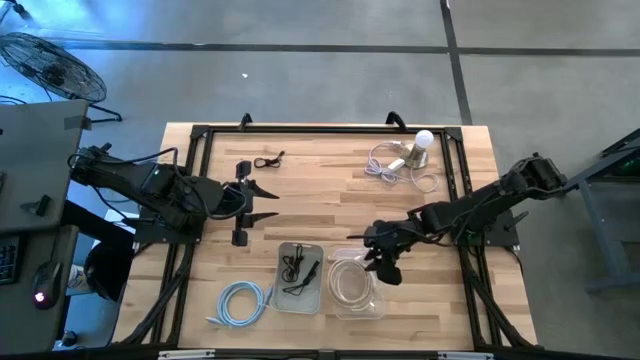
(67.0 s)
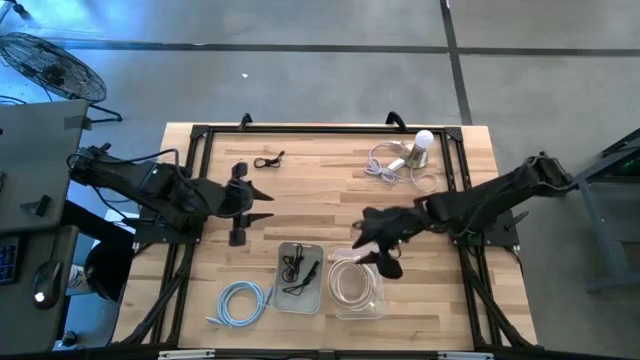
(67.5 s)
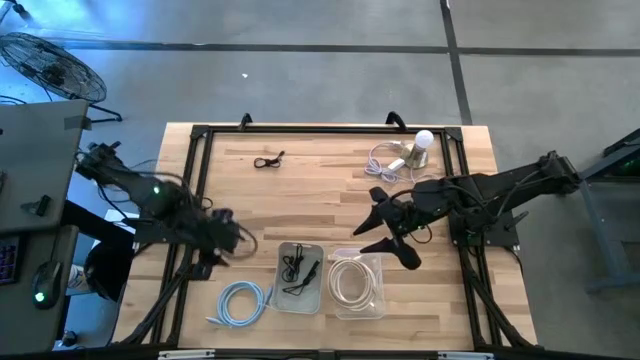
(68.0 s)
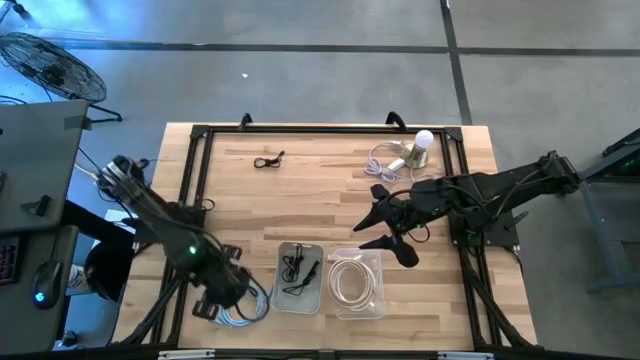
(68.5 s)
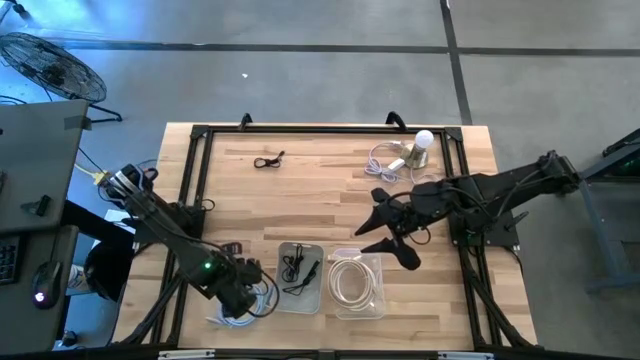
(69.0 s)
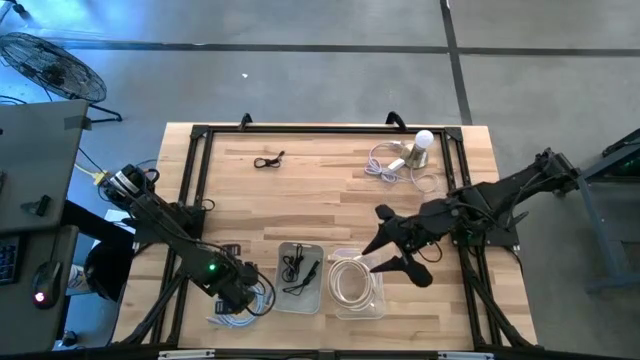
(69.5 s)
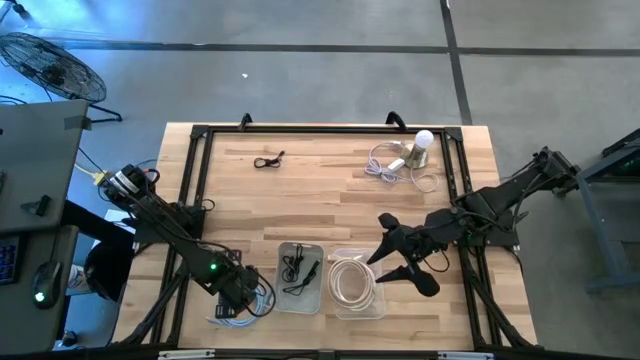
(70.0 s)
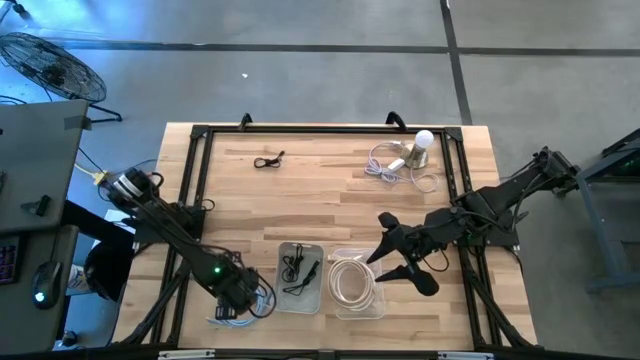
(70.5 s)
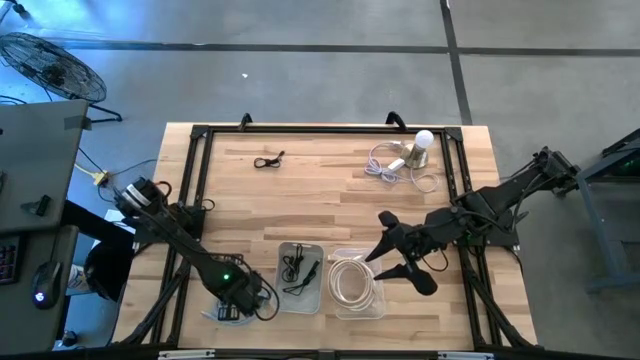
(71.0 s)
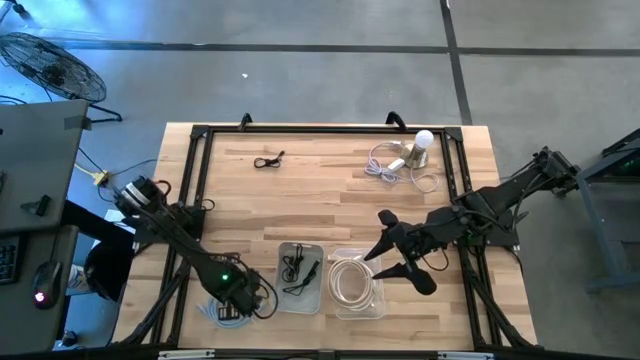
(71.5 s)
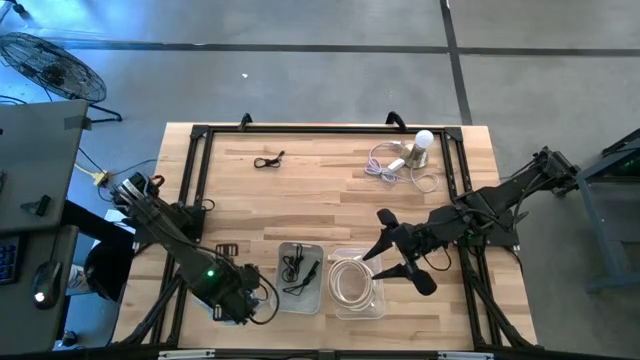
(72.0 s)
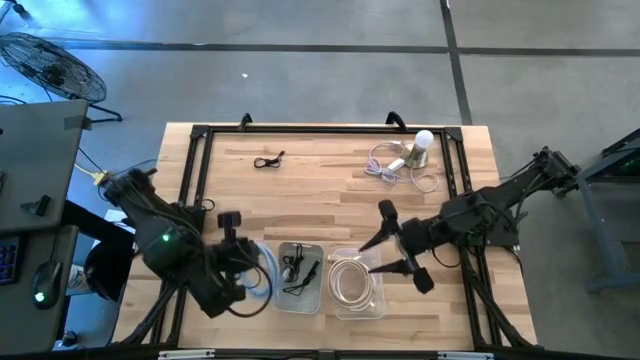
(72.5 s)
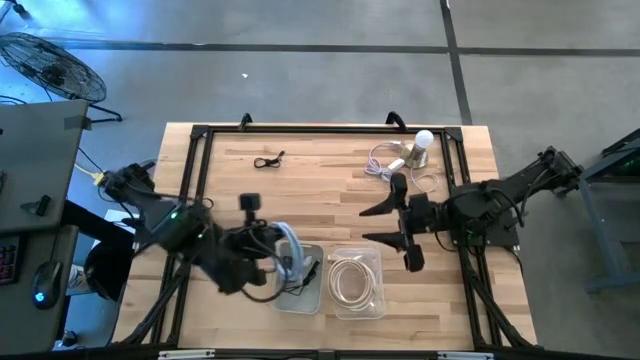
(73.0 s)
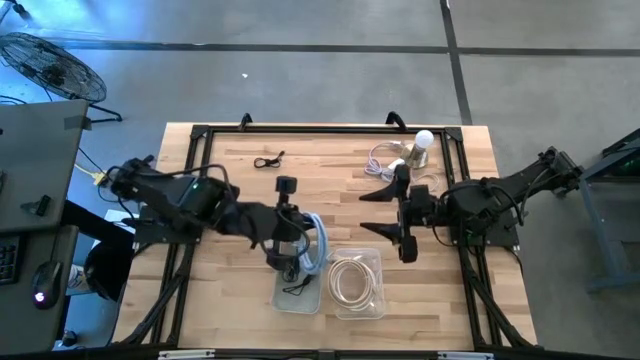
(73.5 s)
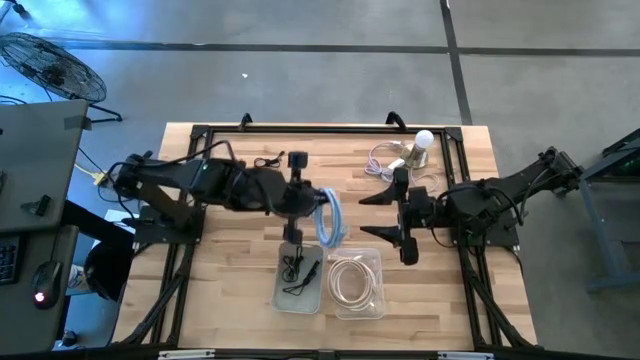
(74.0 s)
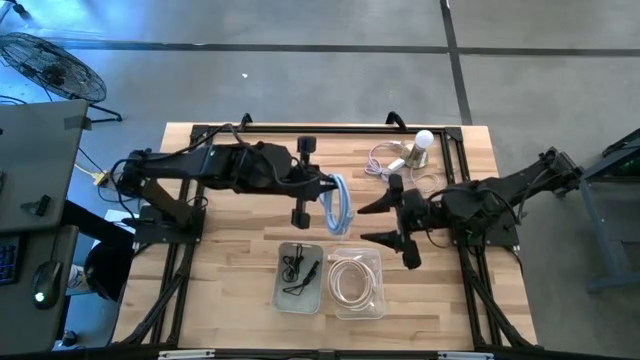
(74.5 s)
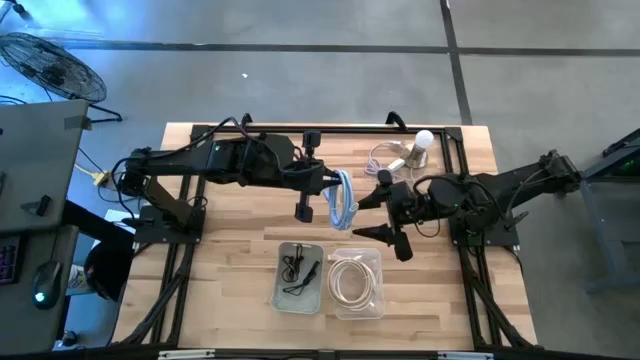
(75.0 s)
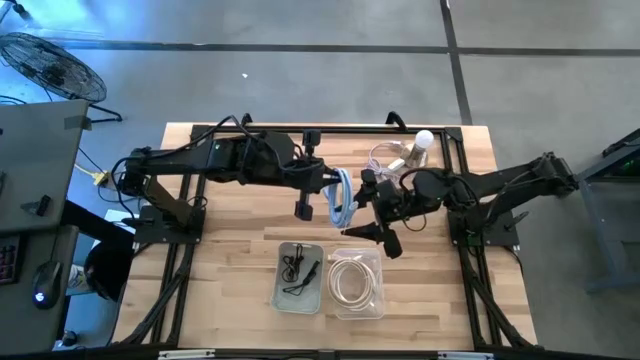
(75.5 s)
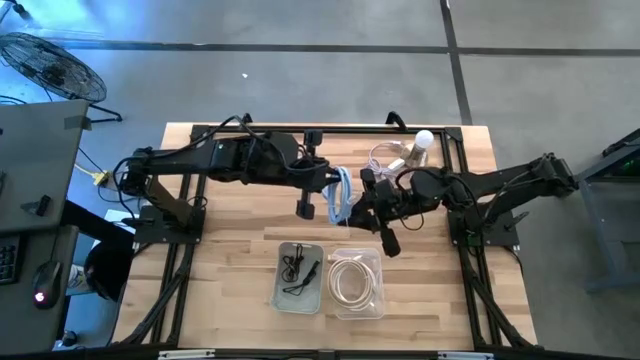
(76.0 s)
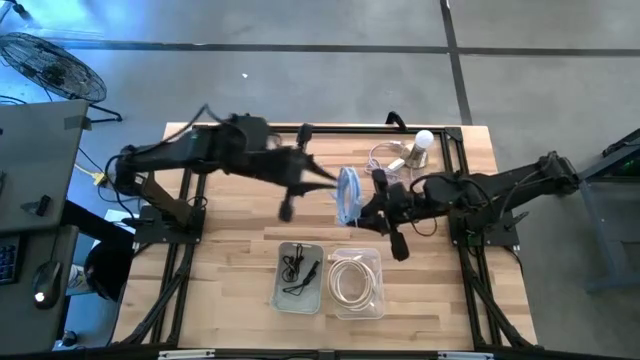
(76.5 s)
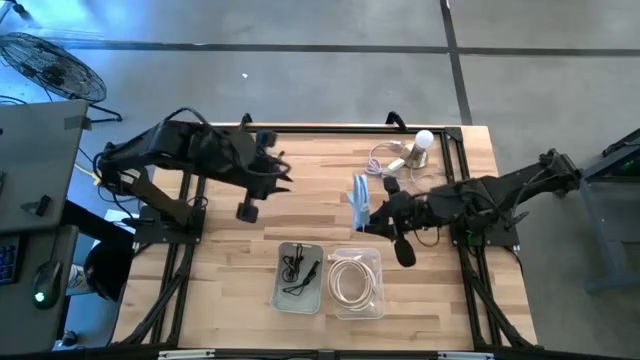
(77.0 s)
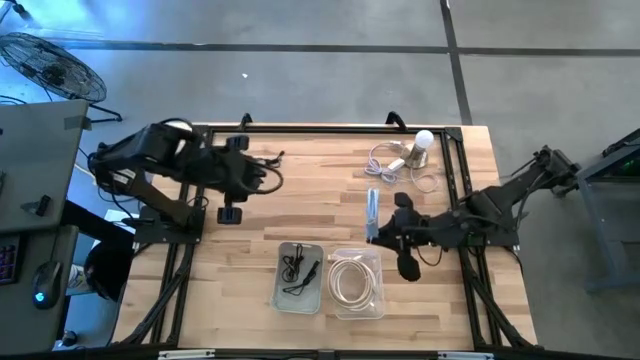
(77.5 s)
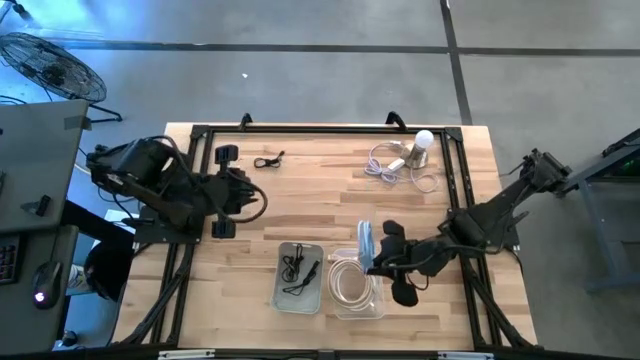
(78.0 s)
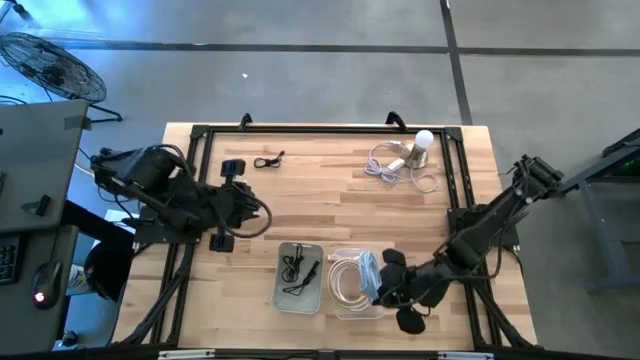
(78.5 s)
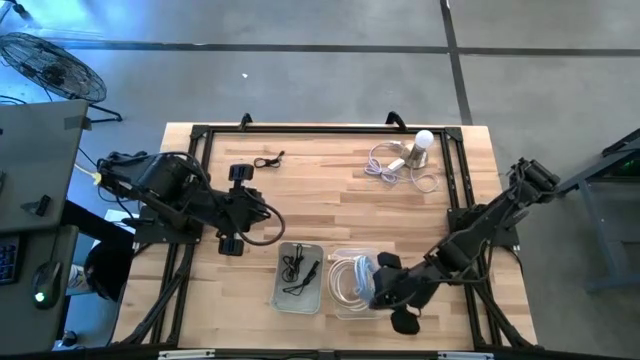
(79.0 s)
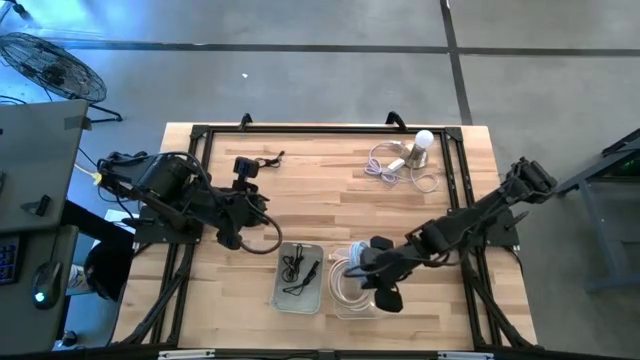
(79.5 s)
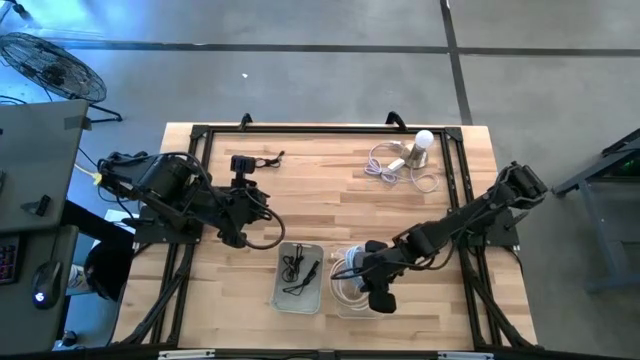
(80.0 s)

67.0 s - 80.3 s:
Task: Pick & Place USB Port
Put the blue HDMI cable into the transparent bin

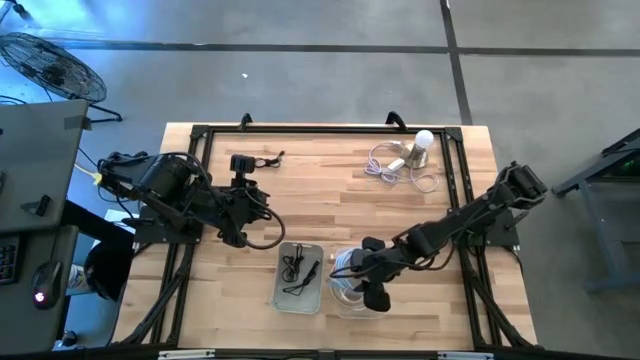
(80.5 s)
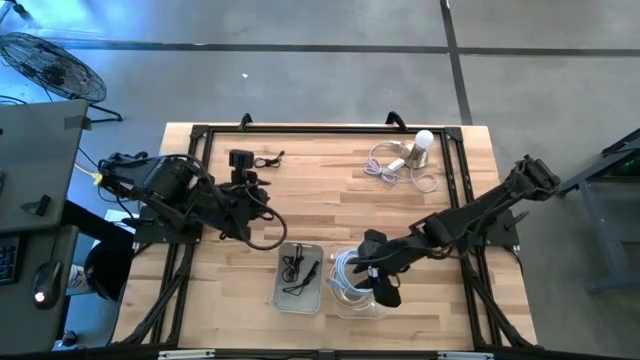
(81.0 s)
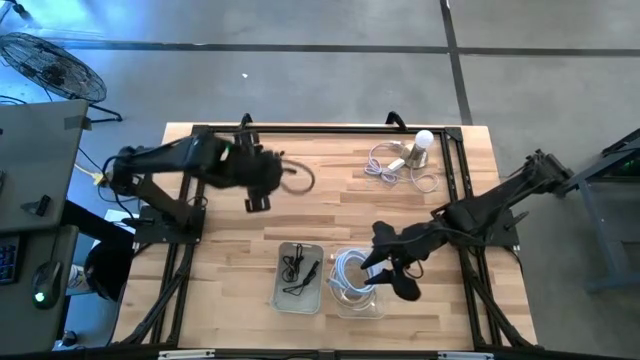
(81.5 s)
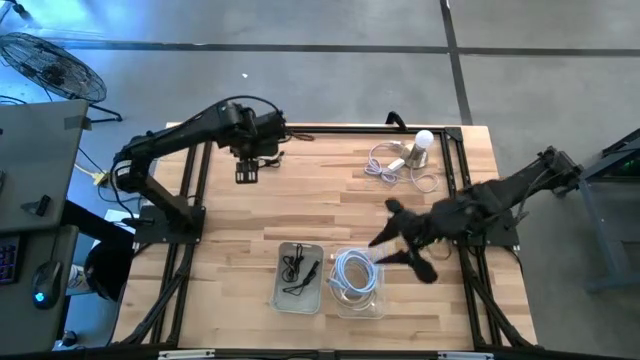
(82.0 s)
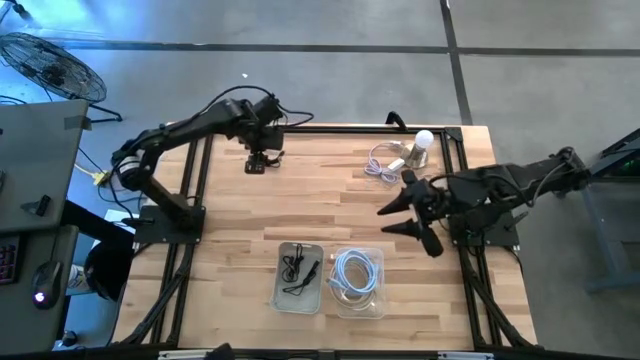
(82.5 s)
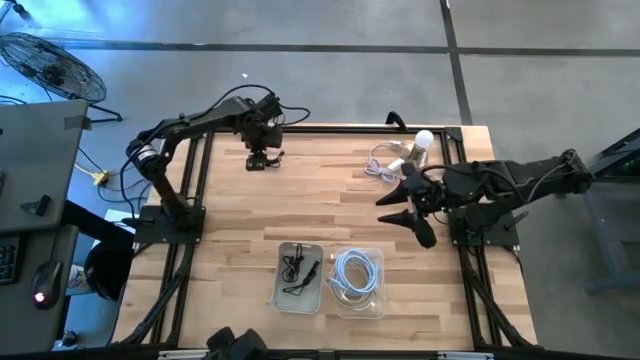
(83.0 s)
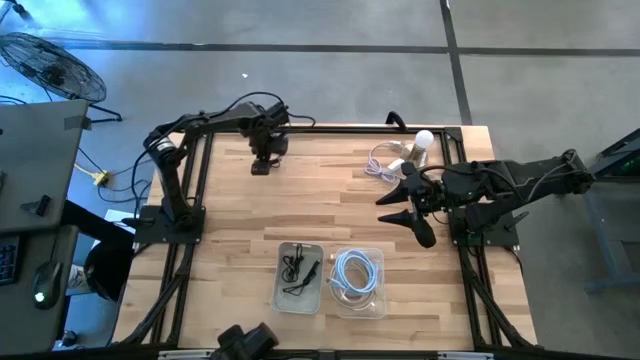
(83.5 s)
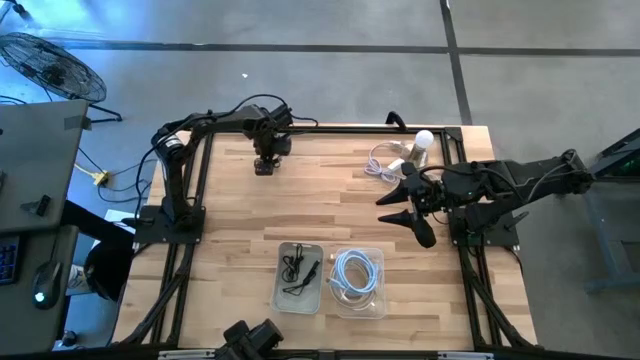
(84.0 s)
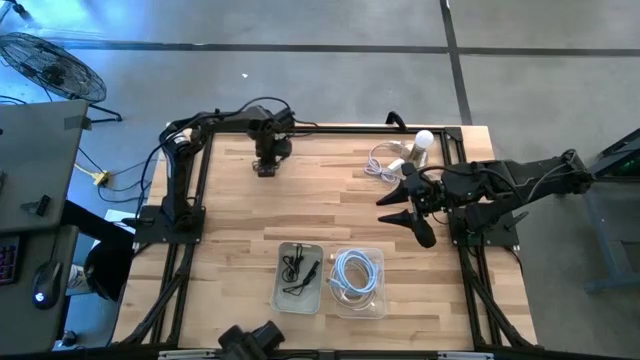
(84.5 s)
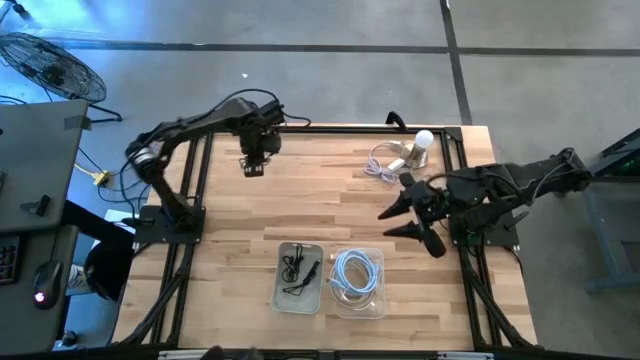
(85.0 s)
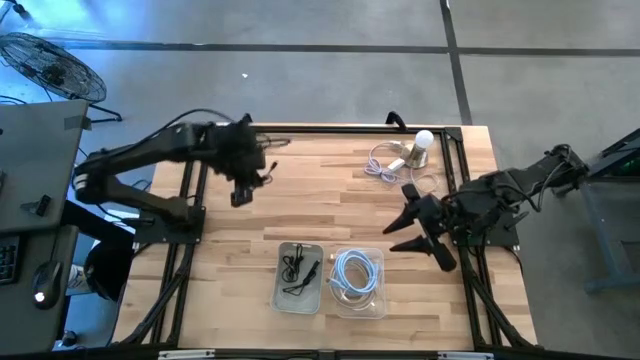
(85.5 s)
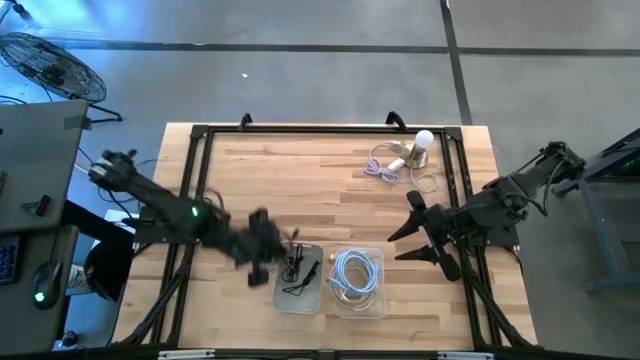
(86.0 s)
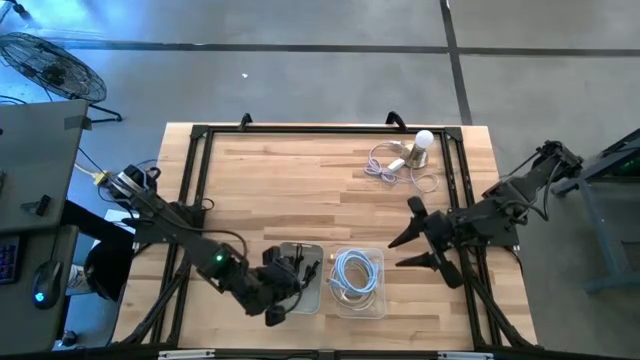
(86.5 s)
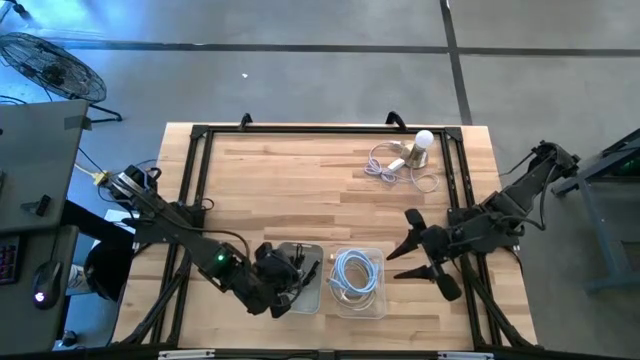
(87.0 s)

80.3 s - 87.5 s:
Put the black USB cable into the gray bin

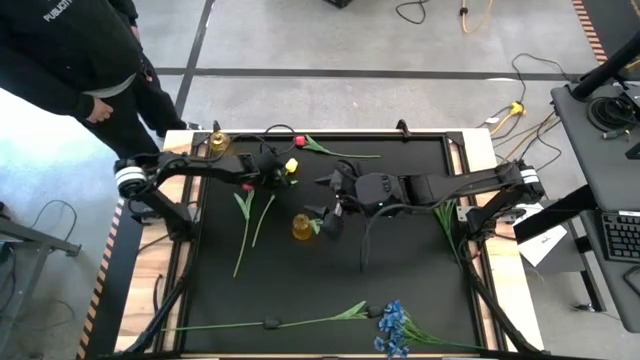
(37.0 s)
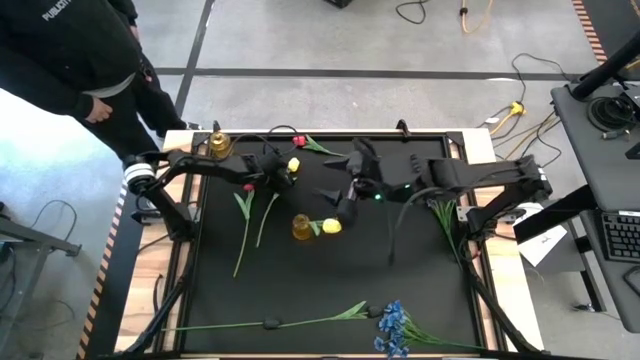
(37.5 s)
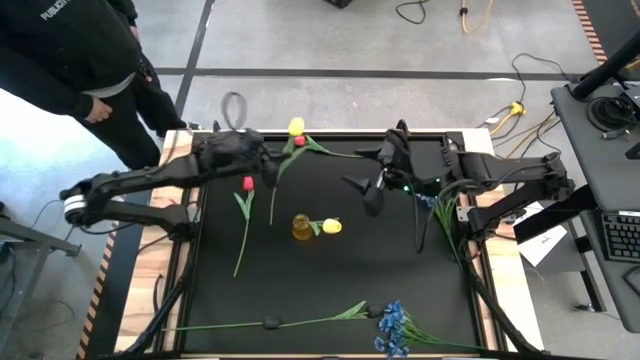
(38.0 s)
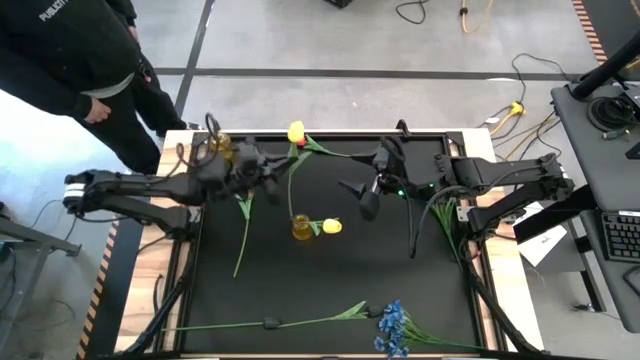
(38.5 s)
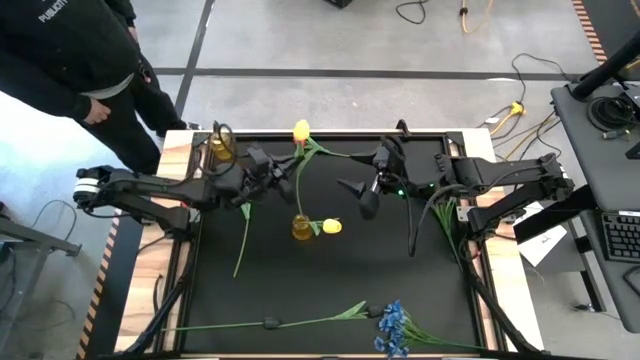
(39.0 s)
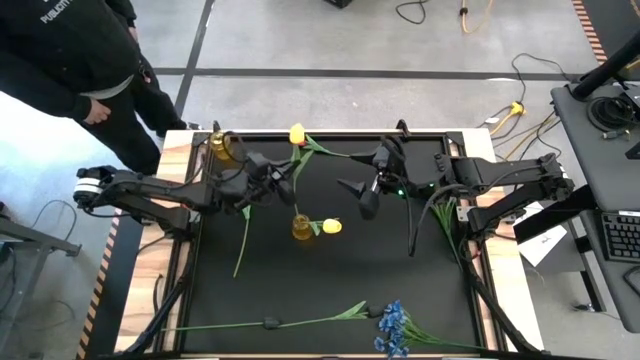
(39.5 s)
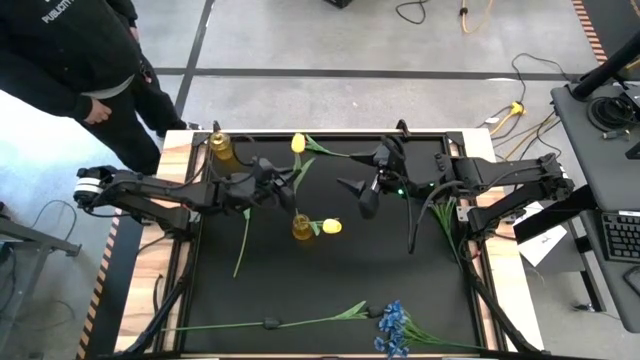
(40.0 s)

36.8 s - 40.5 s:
Task: Sort flowers into vase by color
Put the yellow tulip into the yellow vase
